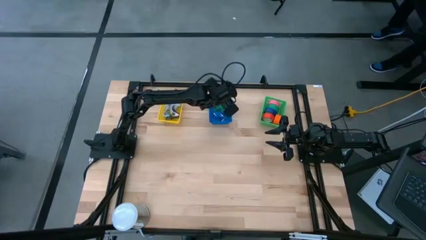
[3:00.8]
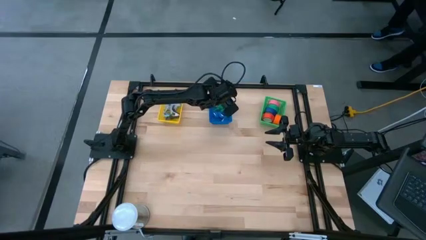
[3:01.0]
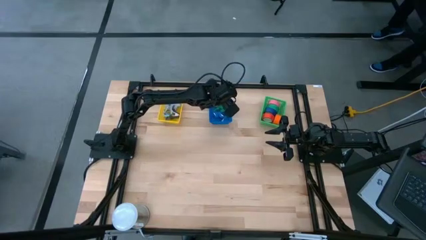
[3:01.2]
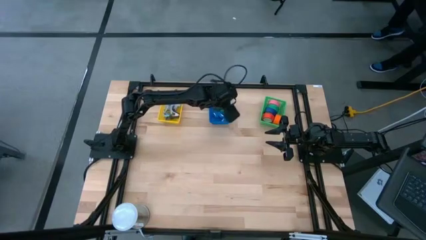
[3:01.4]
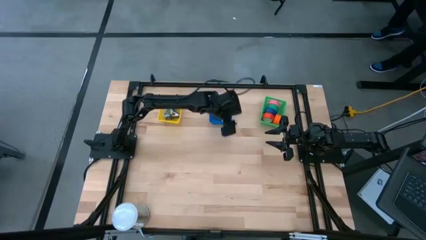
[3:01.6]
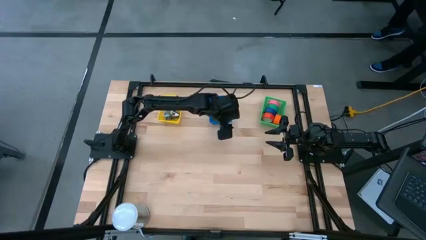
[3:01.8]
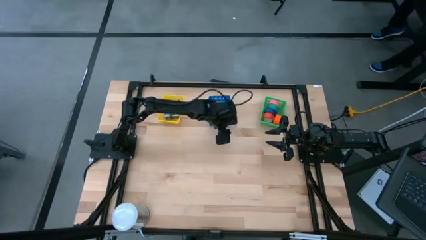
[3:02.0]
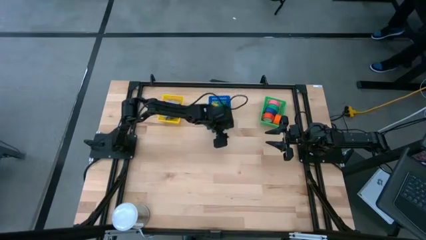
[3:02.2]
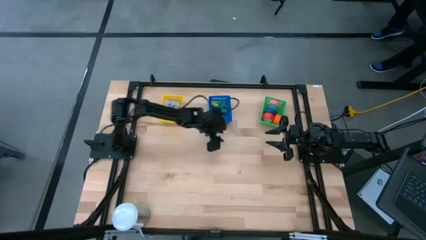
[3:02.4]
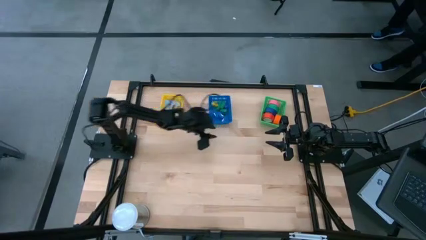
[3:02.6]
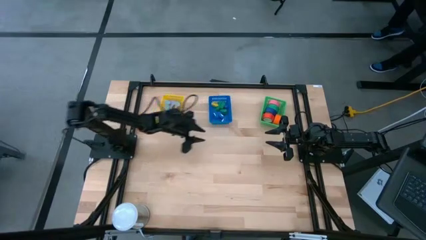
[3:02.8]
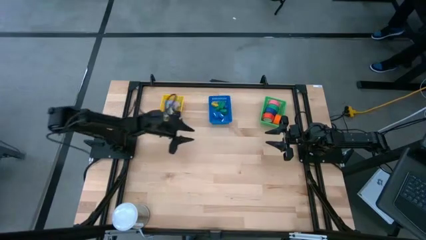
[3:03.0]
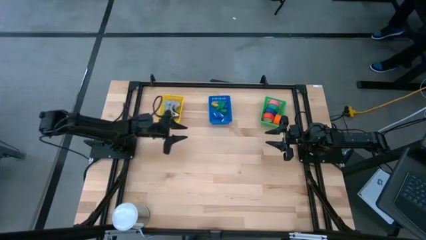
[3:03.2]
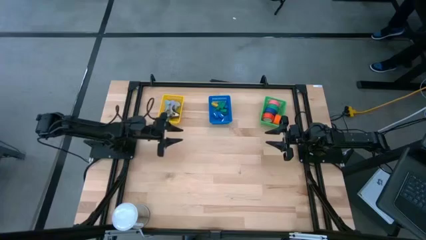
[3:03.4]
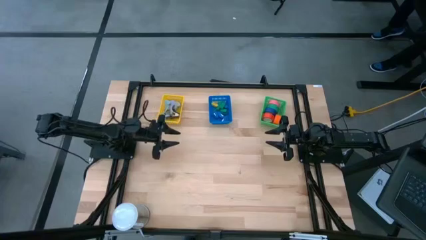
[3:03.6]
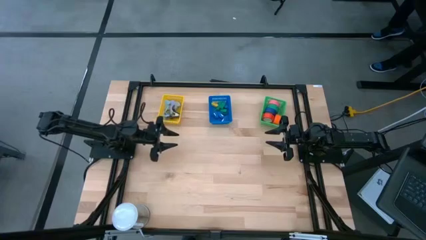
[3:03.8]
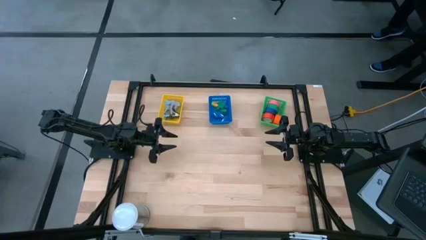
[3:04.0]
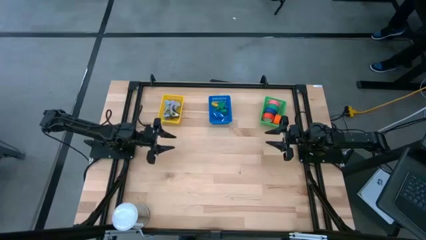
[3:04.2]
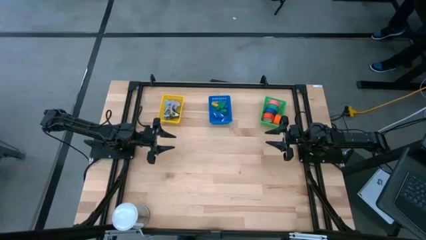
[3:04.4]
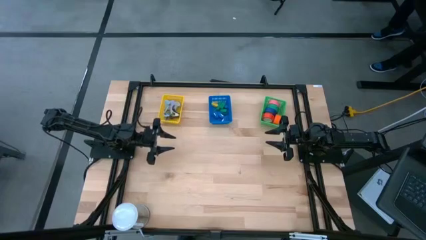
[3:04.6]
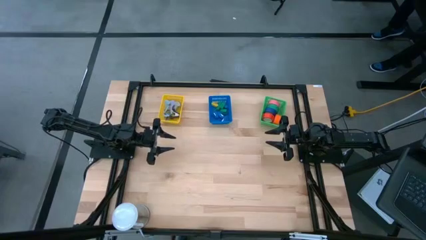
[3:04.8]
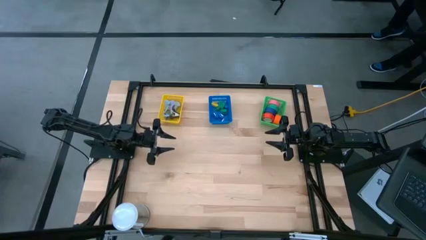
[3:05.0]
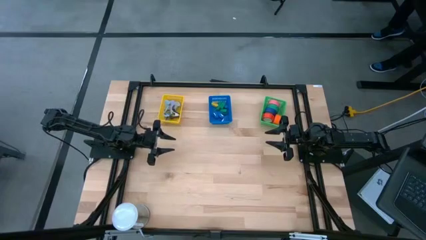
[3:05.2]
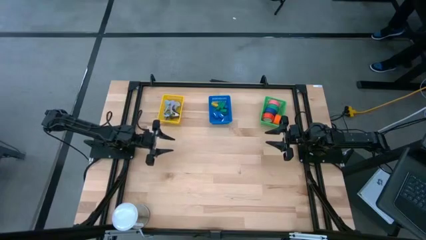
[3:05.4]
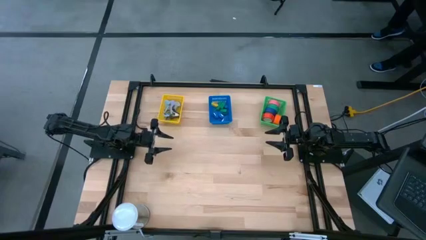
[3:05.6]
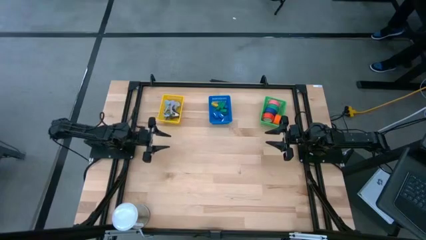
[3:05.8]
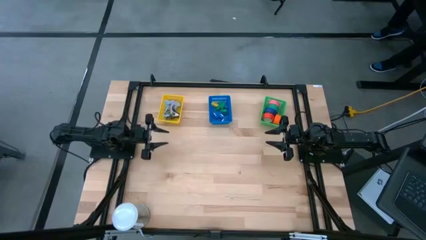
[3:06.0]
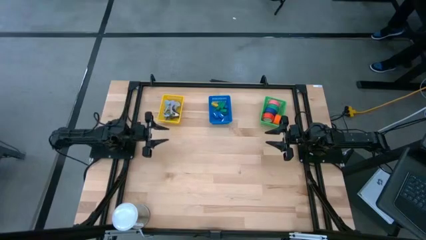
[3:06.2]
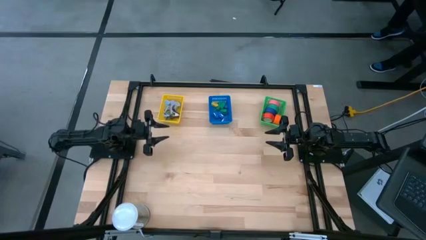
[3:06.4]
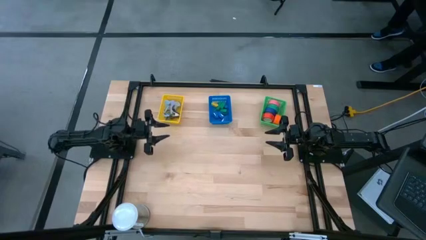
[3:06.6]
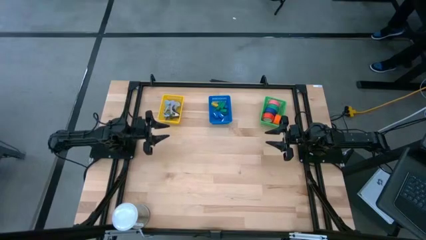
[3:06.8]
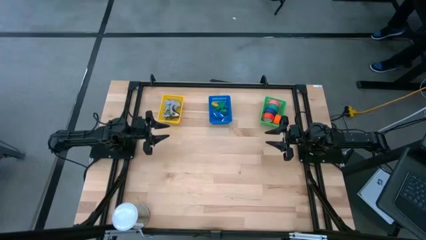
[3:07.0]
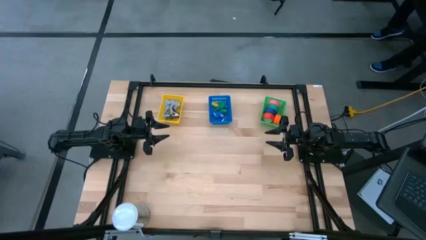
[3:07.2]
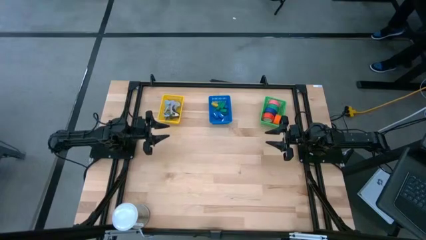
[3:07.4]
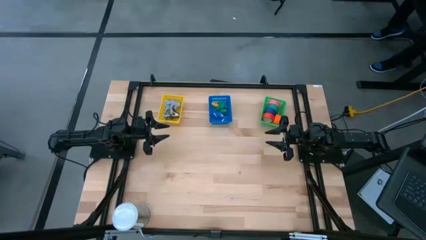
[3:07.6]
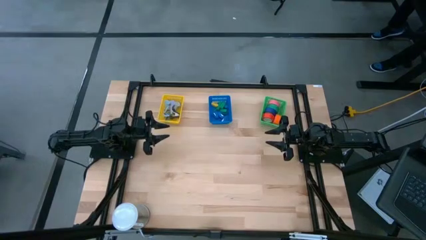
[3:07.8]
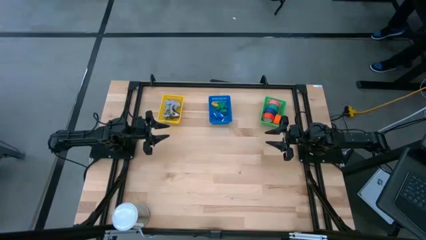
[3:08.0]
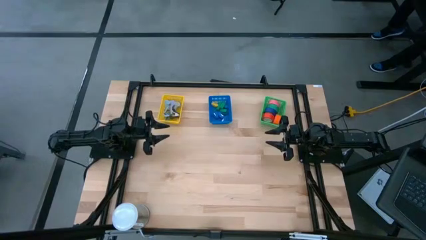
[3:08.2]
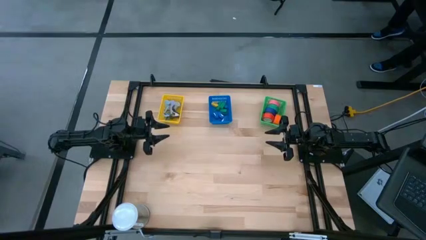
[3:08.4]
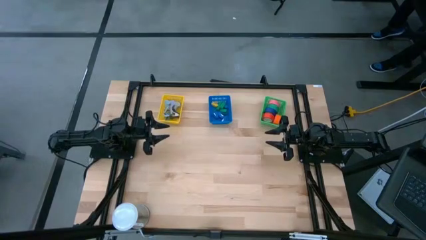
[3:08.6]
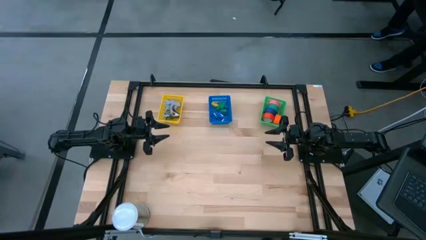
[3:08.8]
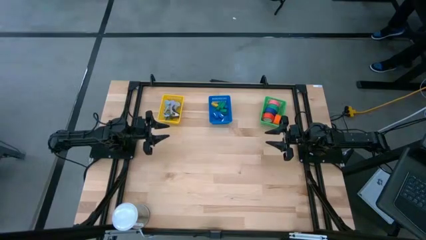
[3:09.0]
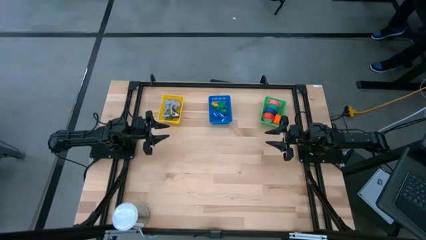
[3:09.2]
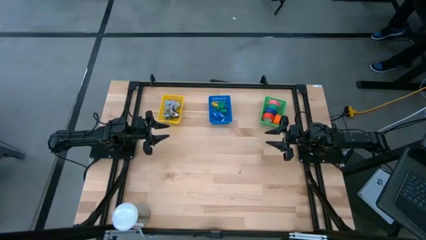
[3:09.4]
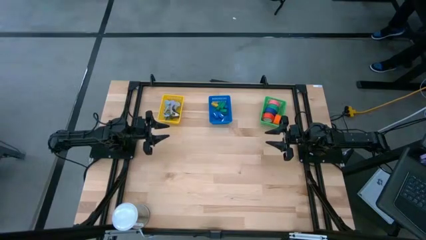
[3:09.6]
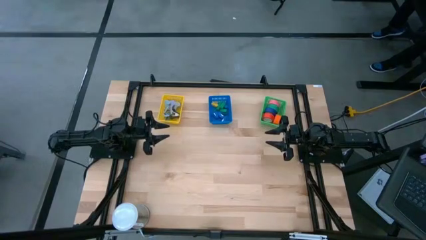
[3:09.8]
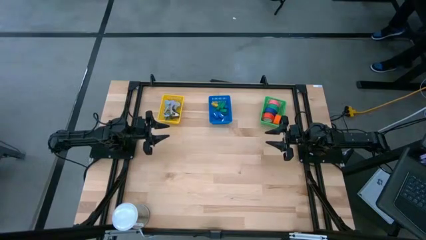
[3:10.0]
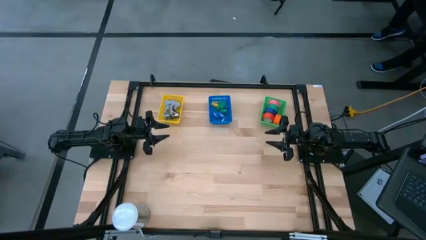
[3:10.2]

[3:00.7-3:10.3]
Task: Pick and place Stapler, Stapler remover, tape
Return to Home Position

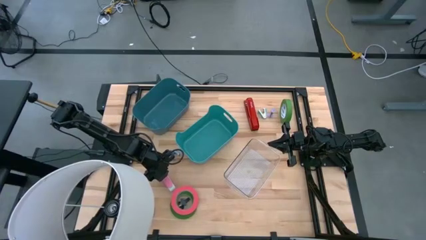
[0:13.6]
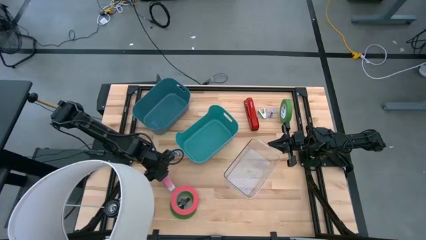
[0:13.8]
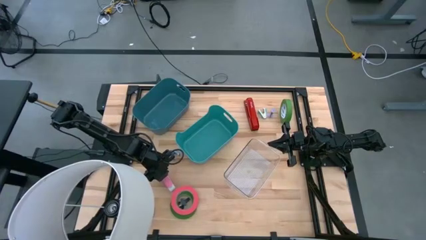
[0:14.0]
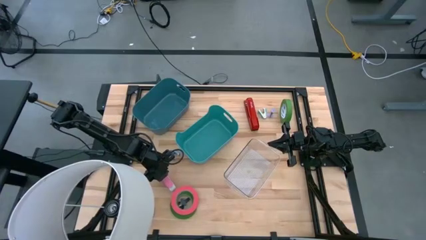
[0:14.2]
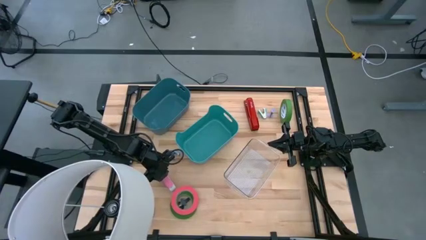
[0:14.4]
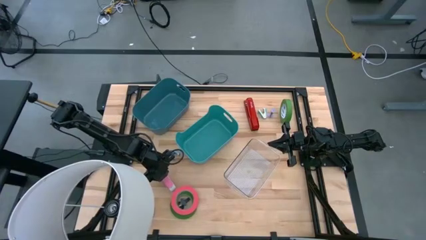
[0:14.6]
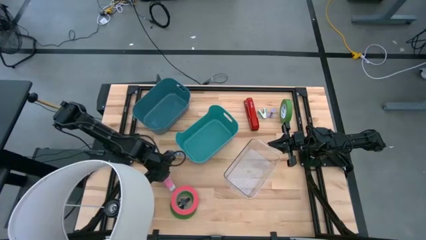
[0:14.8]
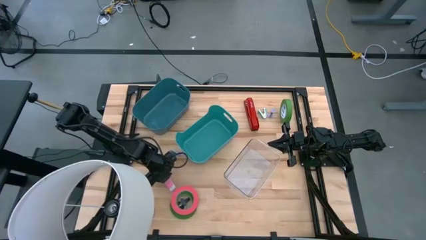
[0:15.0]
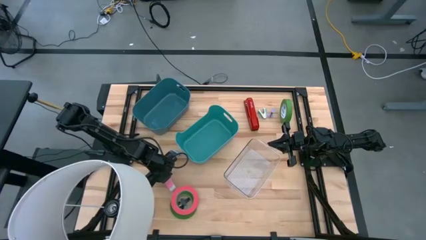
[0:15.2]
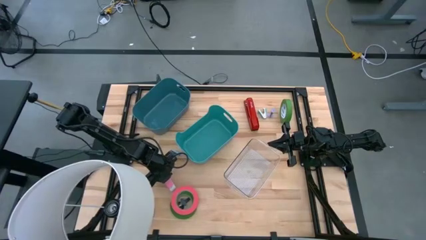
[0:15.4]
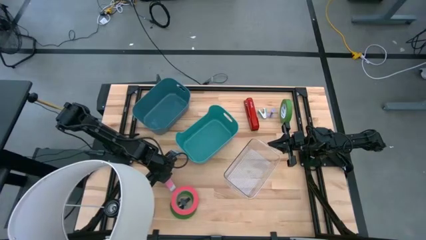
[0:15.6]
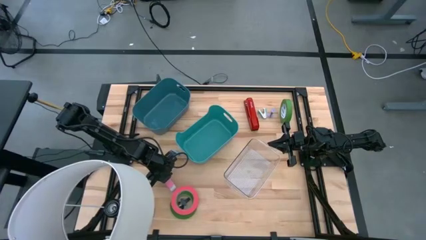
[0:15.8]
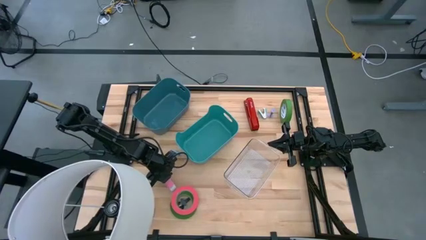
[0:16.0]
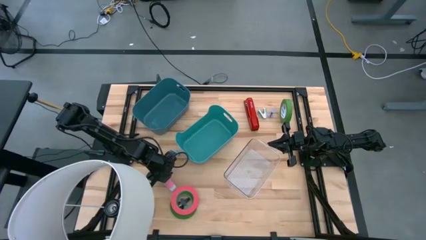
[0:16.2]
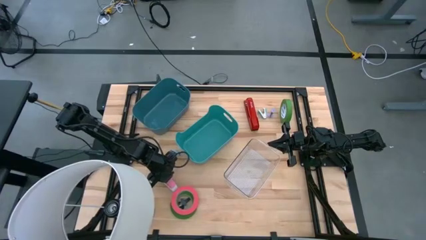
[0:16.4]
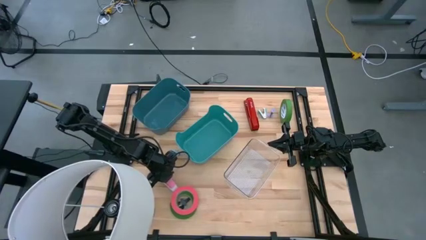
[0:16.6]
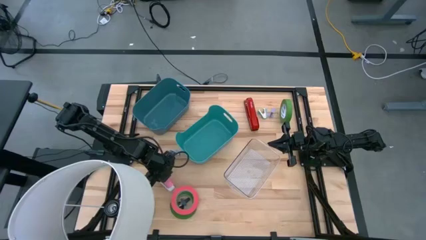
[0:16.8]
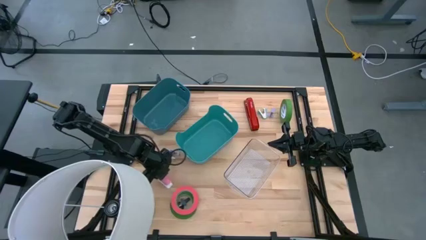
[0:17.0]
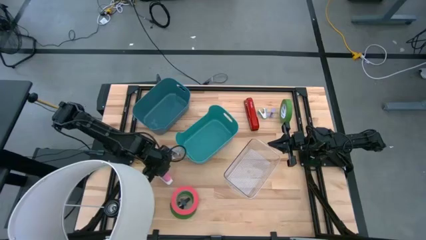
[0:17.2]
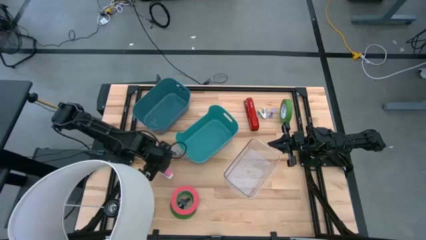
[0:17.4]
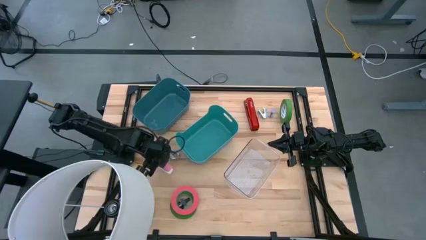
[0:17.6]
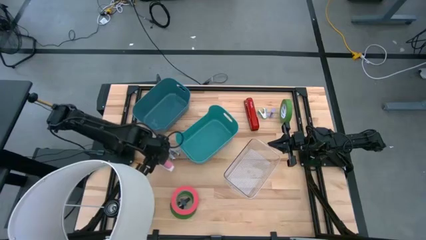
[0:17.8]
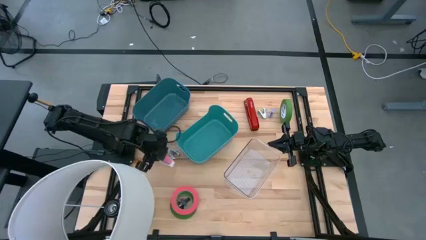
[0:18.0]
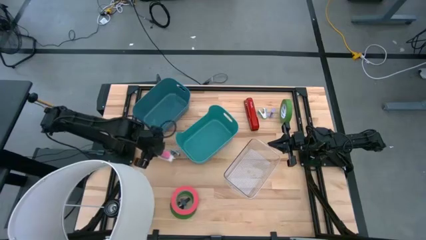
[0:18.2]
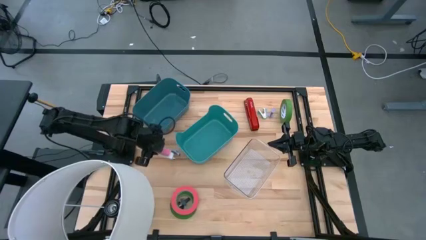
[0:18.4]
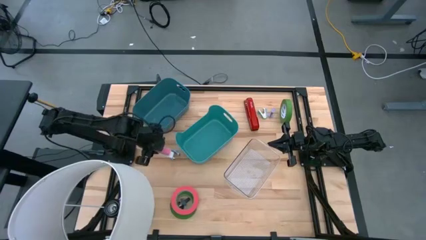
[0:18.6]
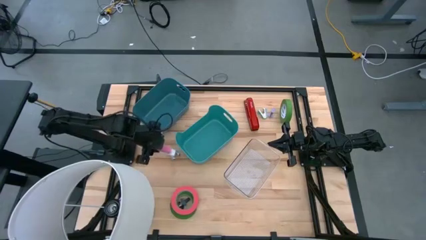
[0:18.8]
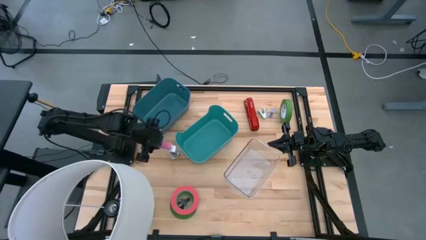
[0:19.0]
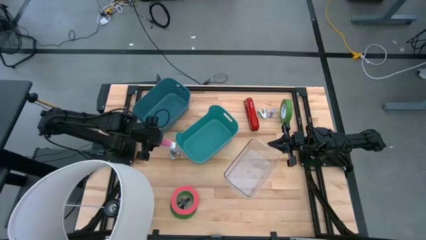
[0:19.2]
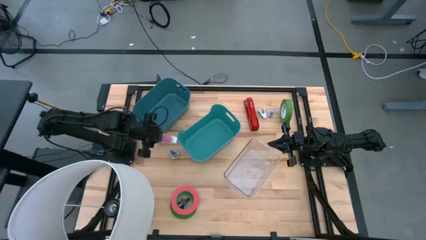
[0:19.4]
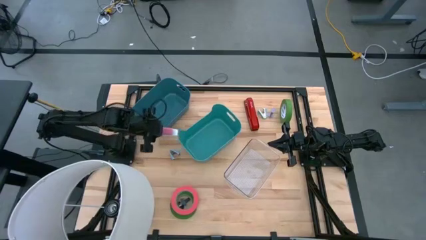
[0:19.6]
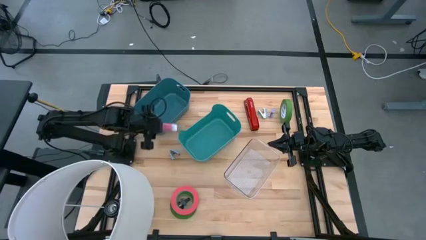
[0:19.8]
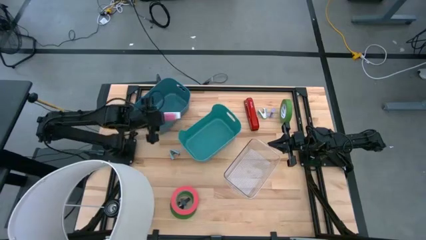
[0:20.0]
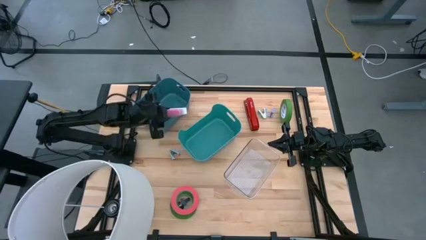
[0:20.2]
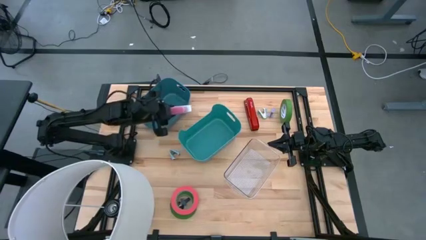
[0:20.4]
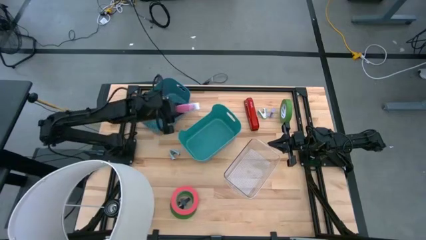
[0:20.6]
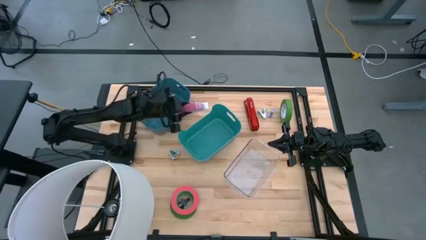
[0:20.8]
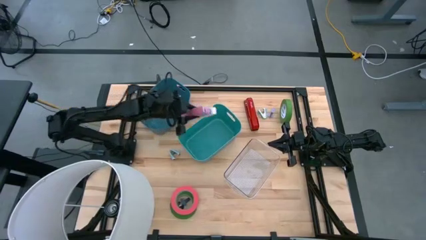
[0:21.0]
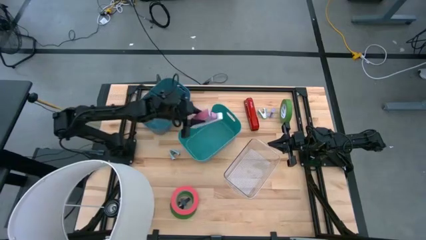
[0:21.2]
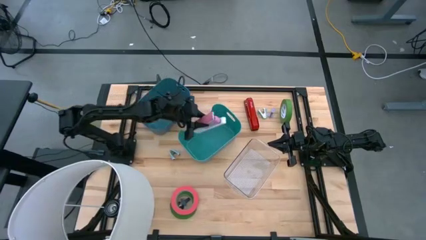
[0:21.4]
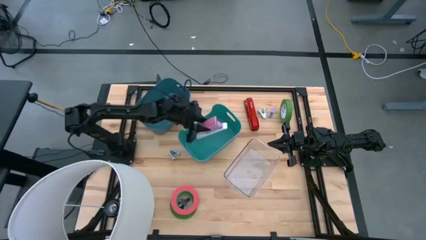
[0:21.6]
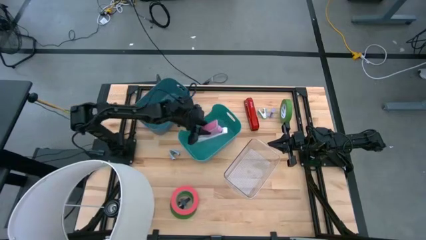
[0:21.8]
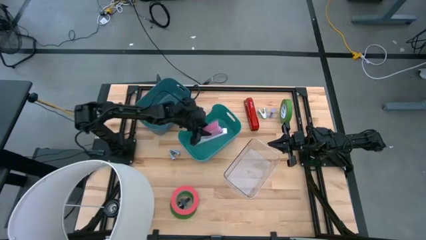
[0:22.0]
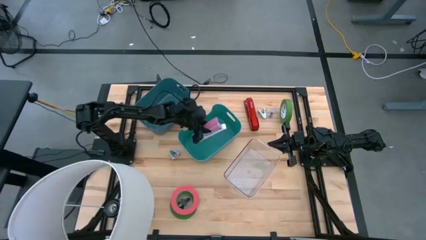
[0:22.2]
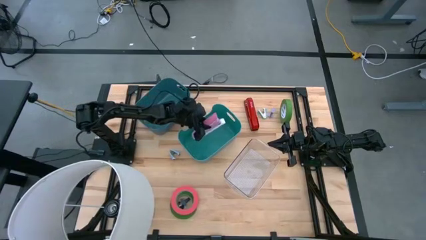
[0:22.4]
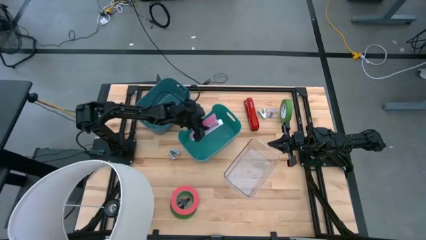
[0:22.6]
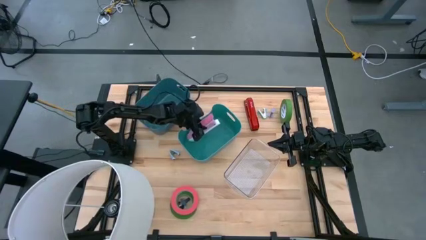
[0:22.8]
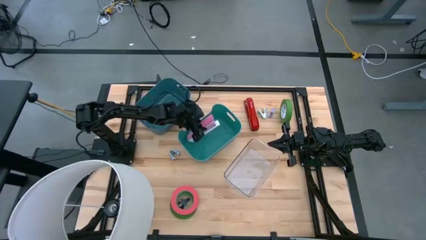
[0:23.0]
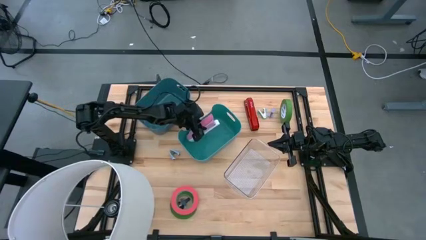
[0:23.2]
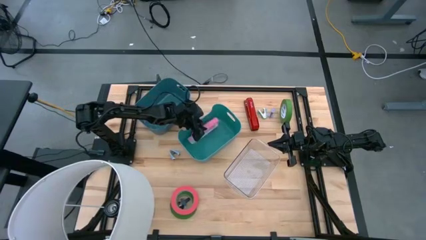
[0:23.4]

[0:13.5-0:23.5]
Task: Pick and place Stapler, Stapler remover, tape
Put the pink stapler into the green bin
